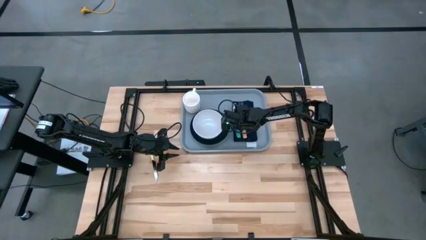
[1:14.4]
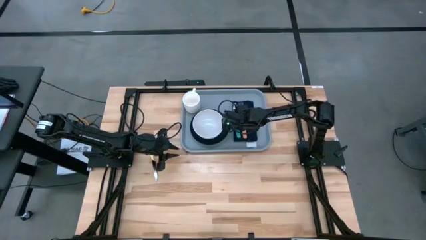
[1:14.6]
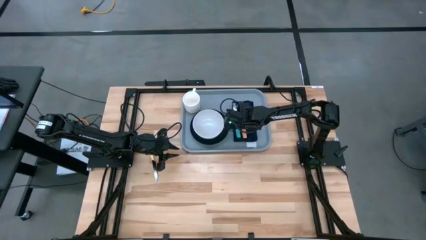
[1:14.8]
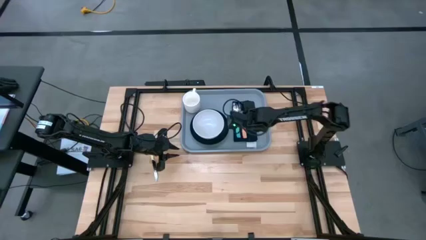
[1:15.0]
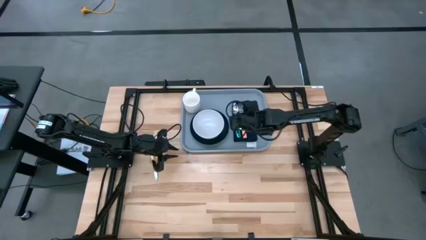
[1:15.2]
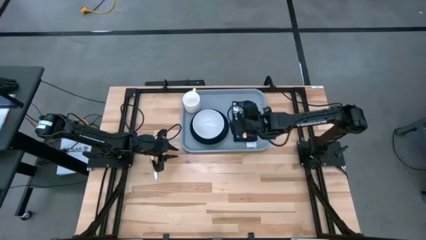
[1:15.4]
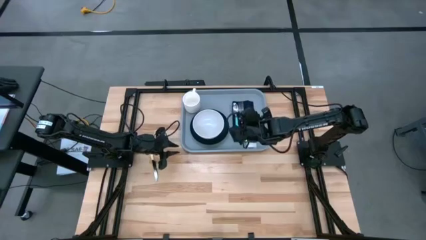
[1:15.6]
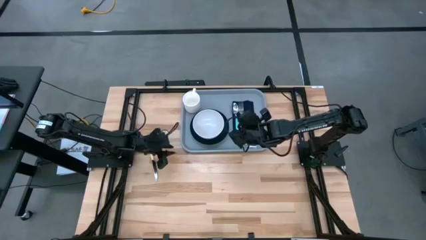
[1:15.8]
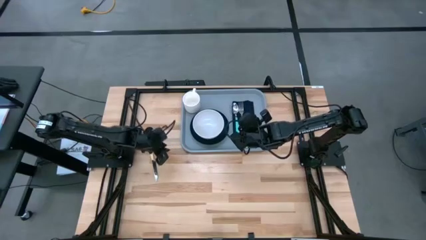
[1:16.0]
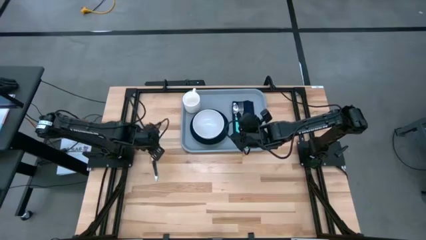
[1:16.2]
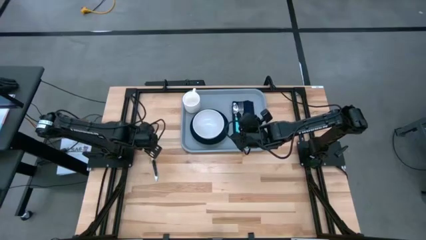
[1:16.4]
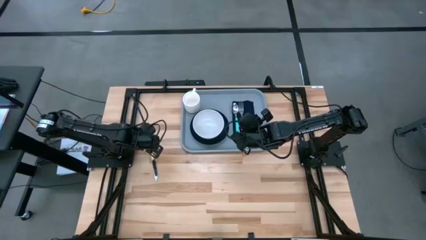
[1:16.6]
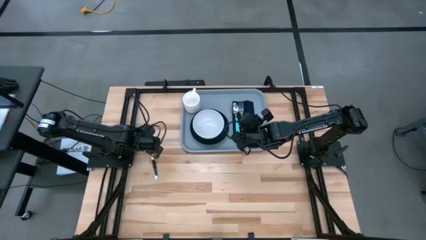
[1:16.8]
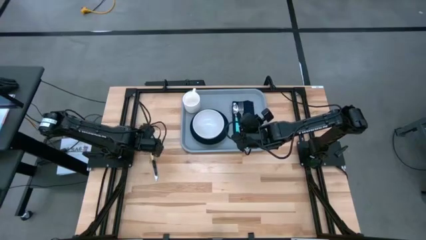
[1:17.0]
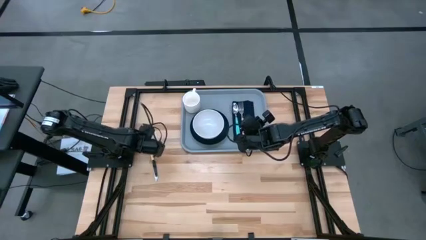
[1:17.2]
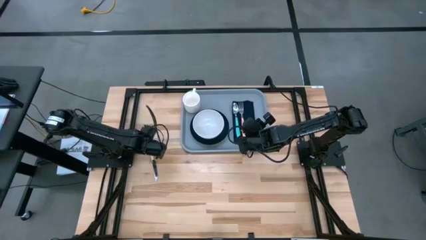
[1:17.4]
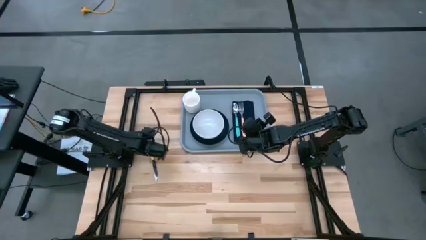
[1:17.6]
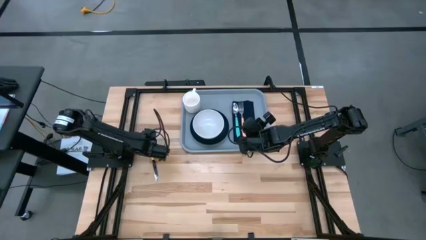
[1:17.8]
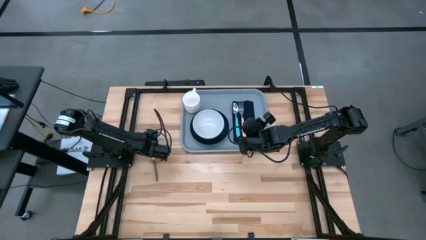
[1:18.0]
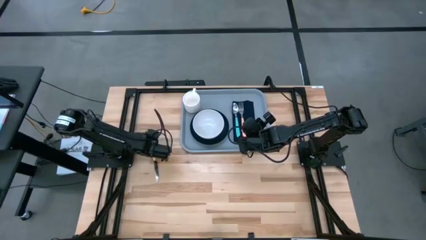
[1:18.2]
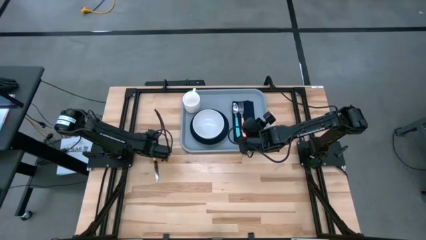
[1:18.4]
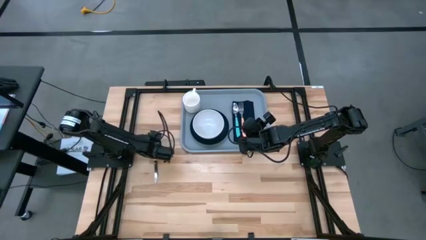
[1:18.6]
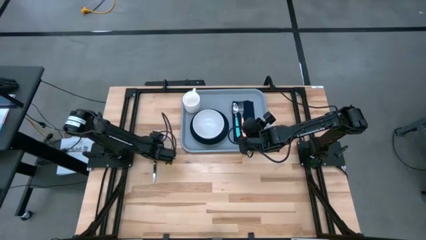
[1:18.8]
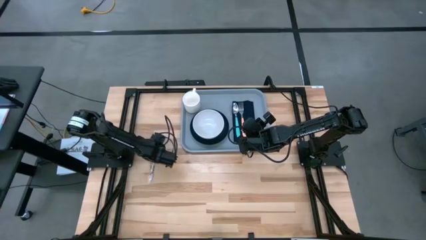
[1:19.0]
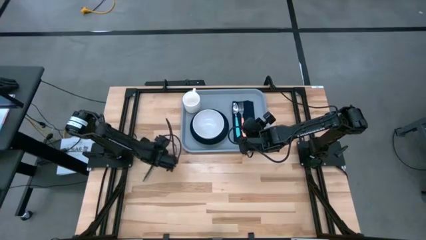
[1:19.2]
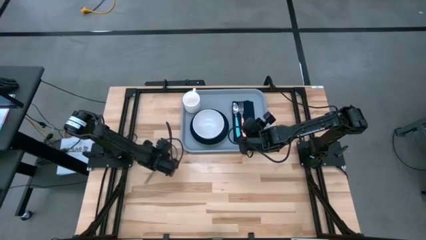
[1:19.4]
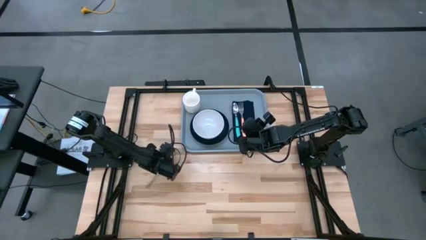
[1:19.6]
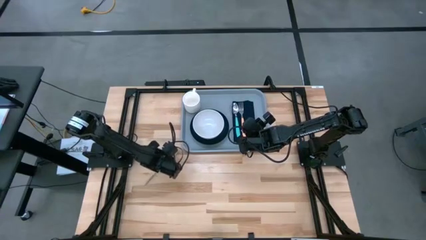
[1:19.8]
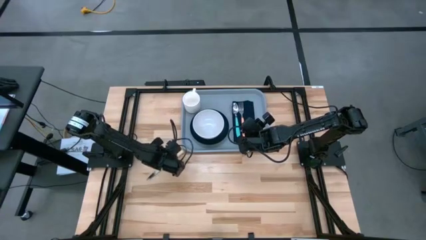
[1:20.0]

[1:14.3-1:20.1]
Task: Set up tray
Put the yellow table knife to the right of the orange fork on the gray table tray

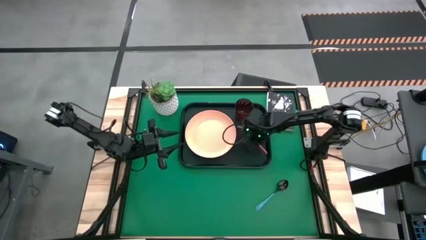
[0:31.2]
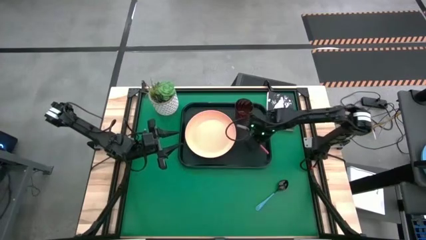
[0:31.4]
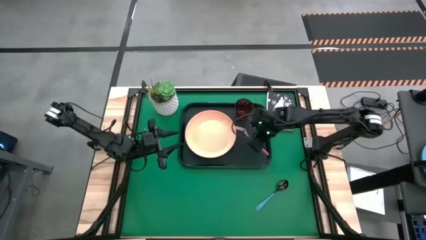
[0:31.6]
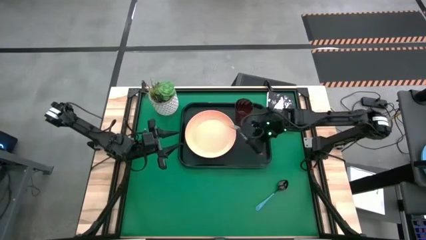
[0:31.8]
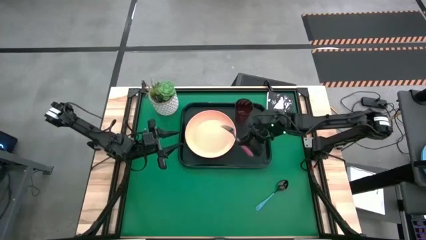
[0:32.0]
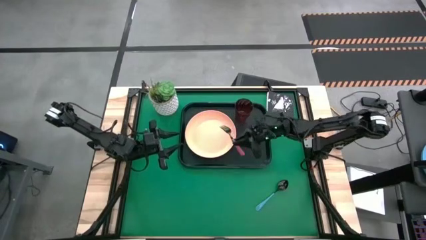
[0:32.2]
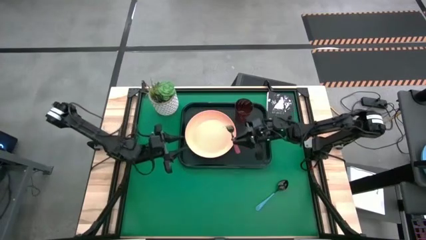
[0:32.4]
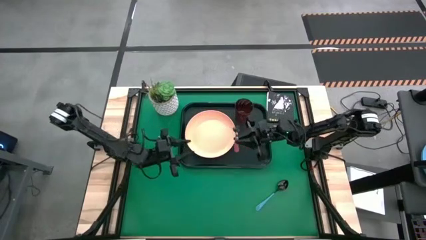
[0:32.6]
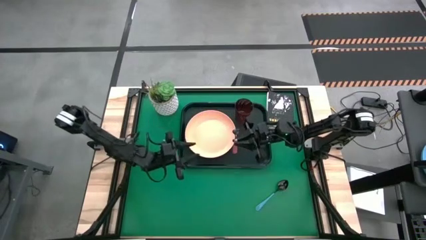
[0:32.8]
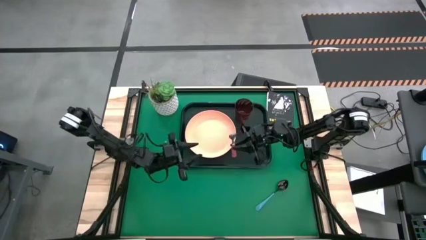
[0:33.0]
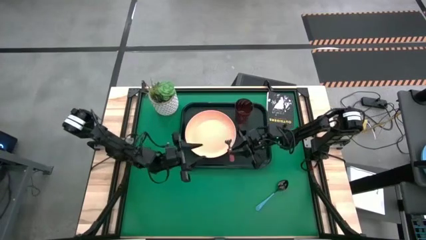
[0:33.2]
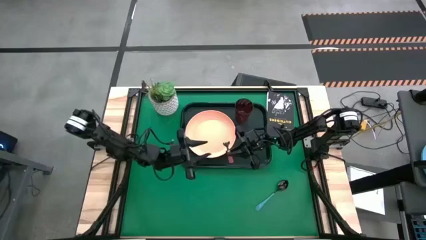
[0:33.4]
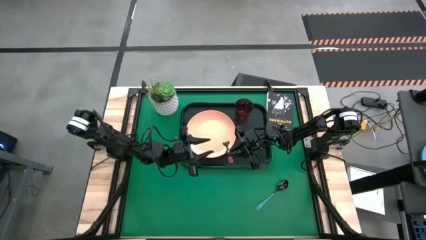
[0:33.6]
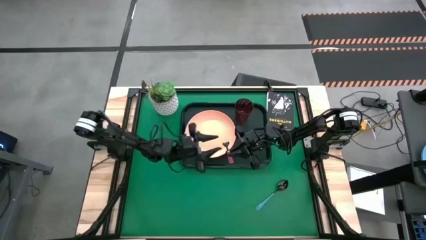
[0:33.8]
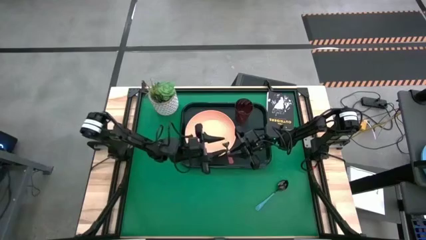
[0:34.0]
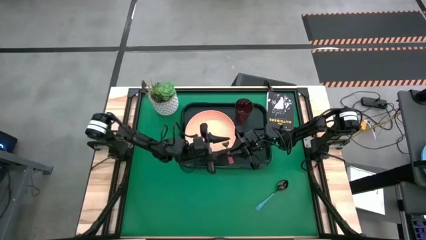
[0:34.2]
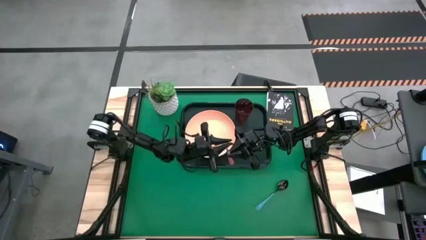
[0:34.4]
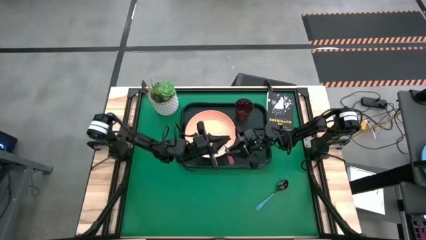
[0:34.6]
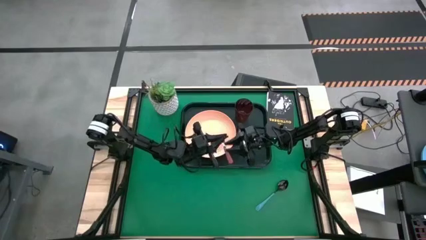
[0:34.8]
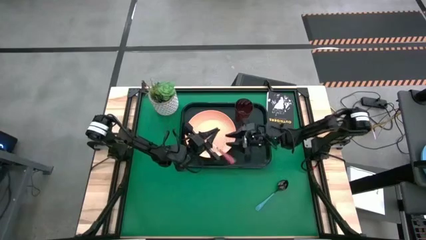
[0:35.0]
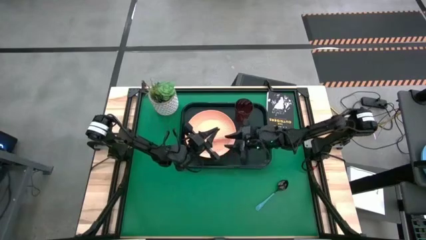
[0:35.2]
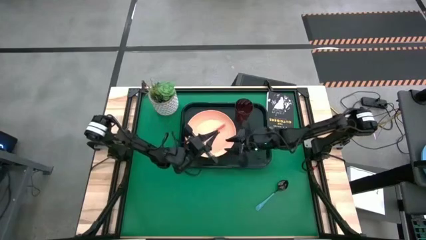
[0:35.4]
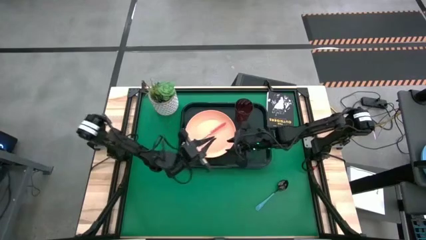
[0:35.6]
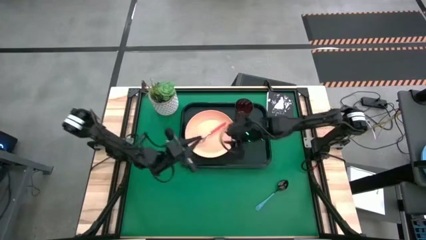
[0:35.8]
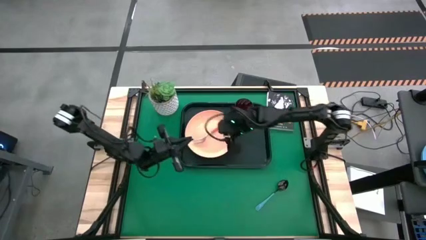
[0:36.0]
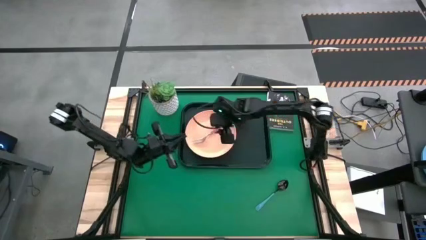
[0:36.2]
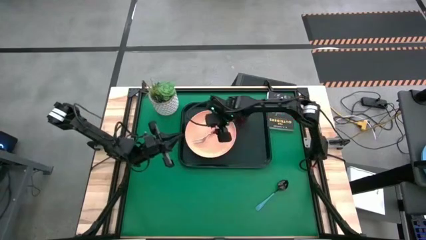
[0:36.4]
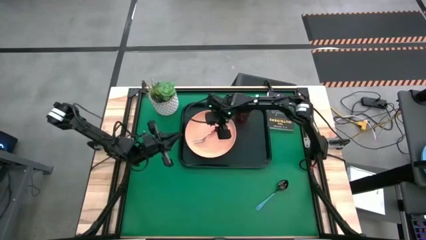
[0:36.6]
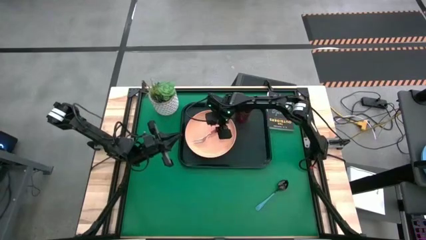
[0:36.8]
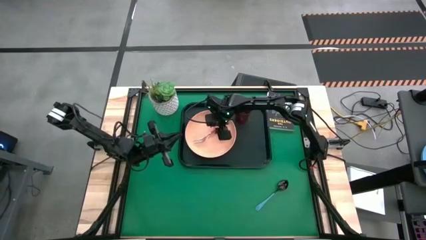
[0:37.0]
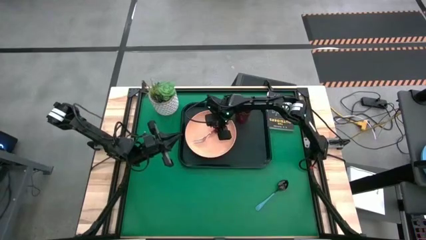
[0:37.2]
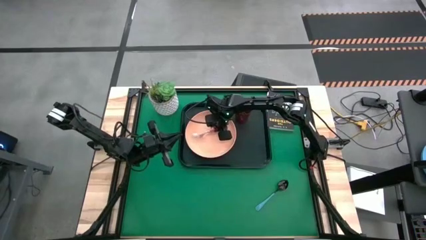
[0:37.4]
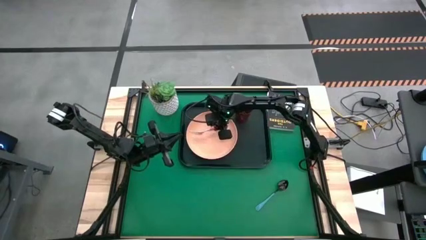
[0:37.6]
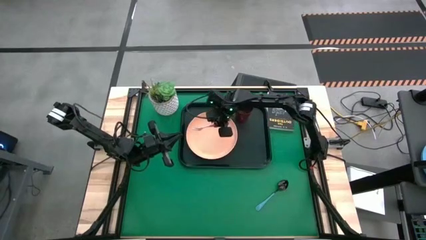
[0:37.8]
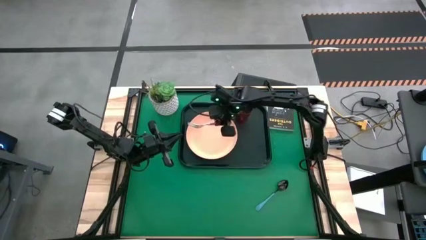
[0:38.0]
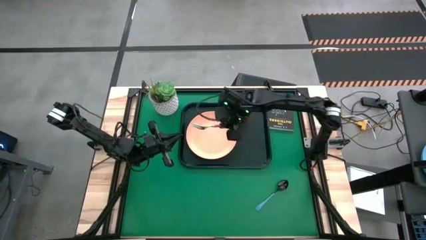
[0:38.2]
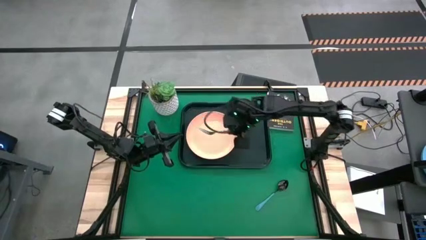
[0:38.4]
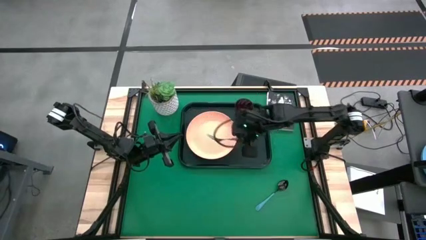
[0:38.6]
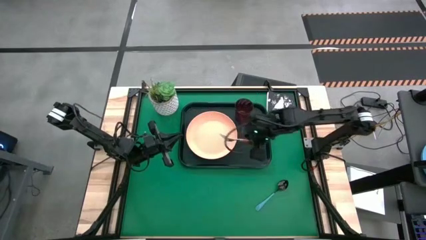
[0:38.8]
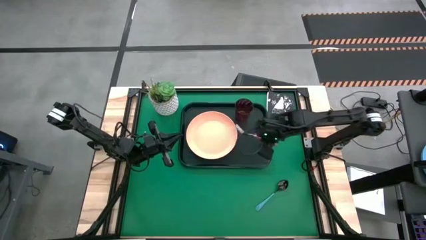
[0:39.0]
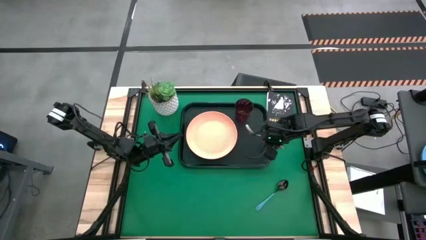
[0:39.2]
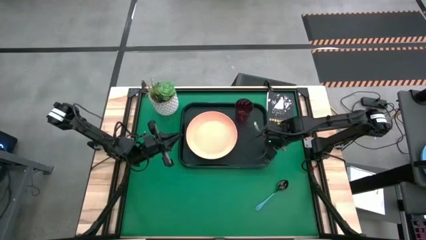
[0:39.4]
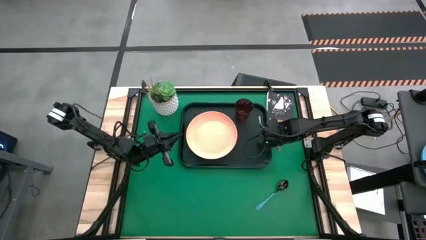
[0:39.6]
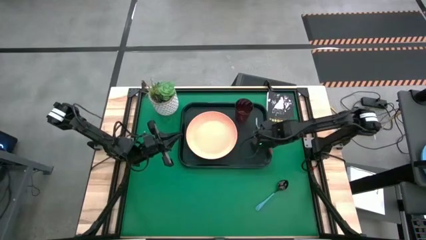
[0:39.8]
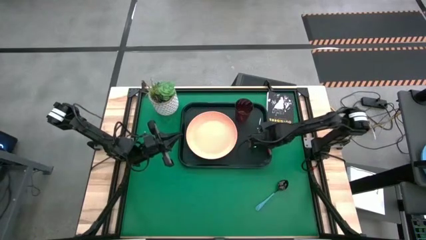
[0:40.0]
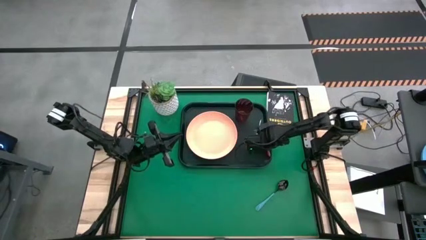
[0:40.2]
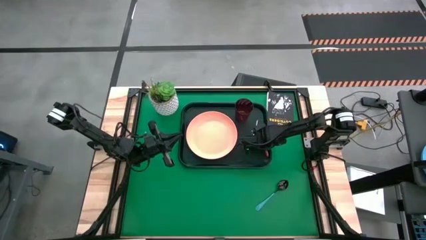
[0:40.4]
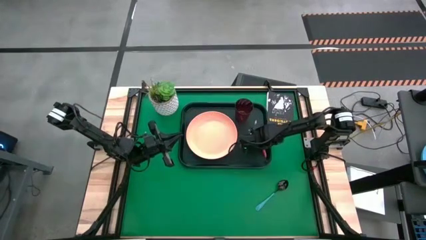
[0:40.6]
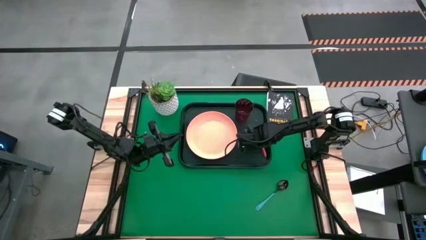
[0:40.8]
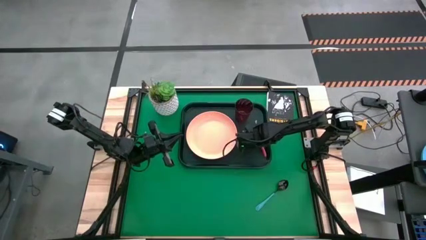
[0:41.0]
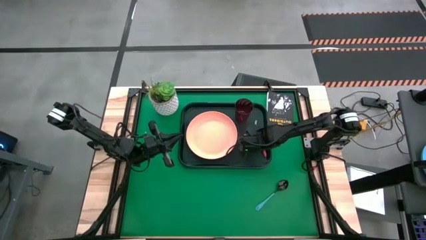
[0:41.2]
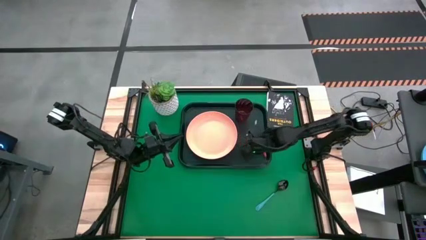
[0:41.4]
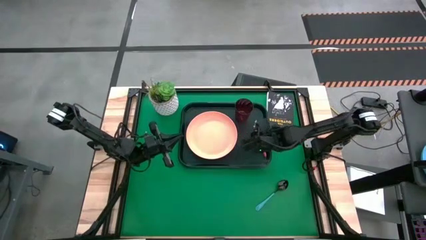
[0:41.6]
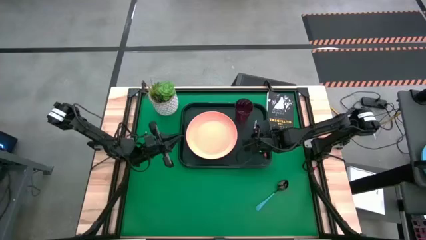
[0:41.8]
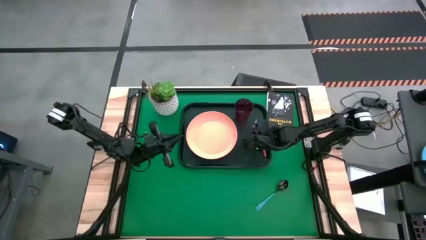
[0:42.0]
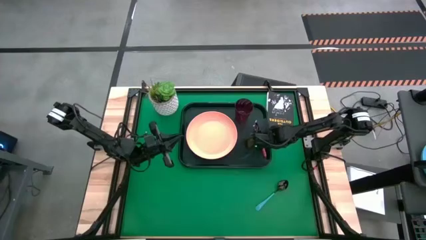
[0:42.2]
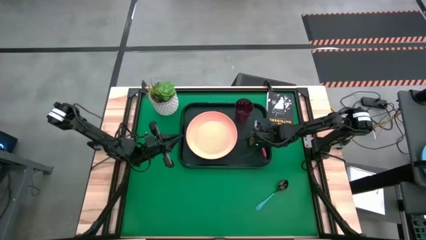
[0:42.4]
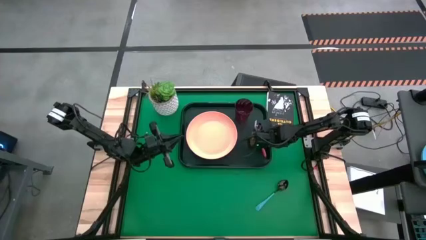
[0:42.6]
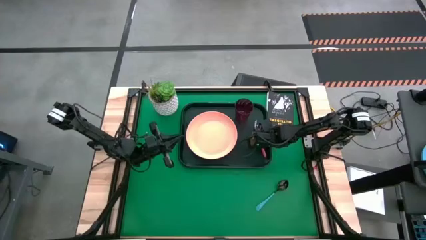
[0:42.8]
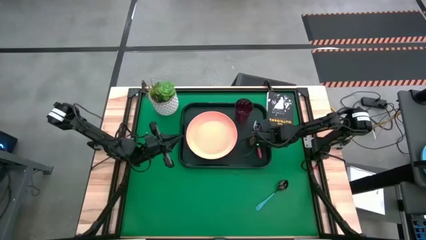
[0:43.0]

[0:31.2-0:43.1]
Task: Pick and place plate/cup/fork/spoon on tray
Put the pink fork on the dark green serving tray to the right of the orange plate
